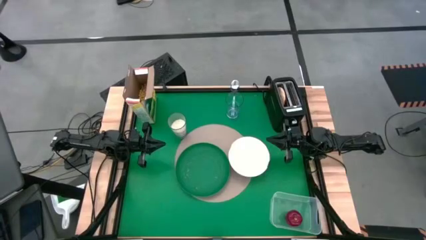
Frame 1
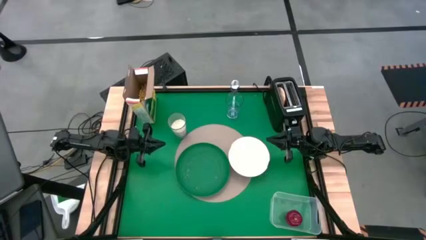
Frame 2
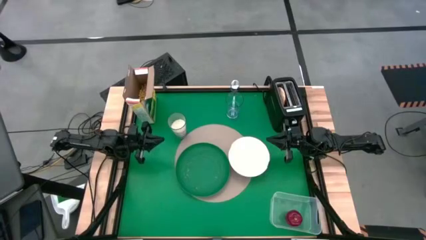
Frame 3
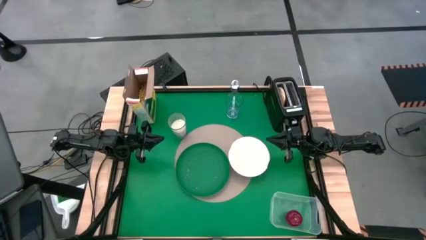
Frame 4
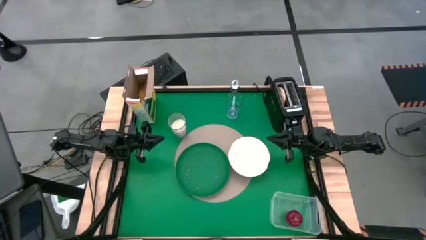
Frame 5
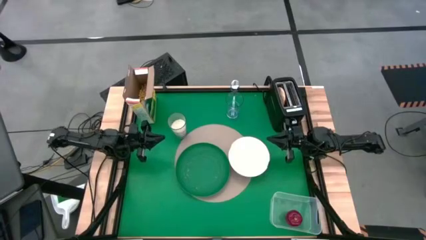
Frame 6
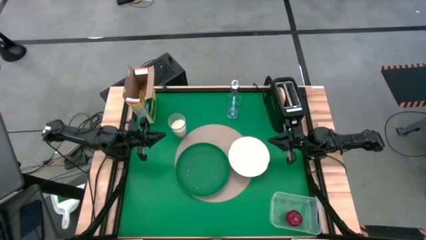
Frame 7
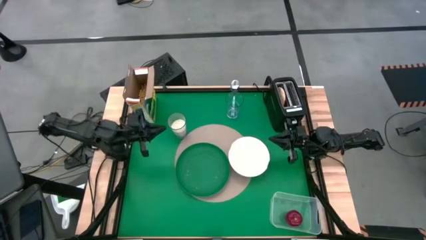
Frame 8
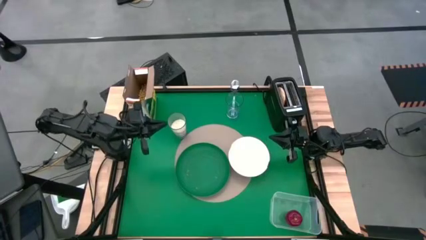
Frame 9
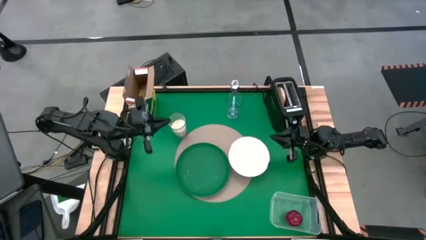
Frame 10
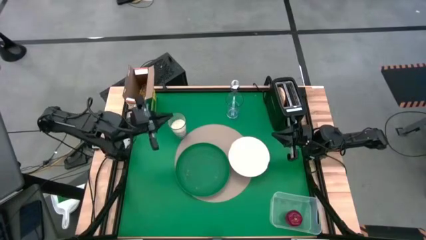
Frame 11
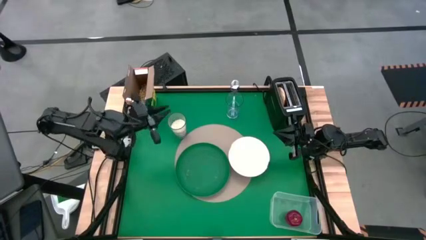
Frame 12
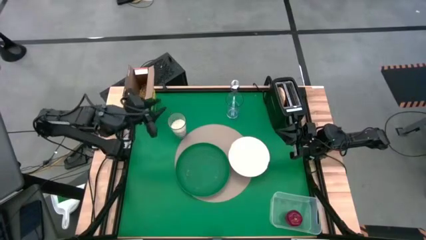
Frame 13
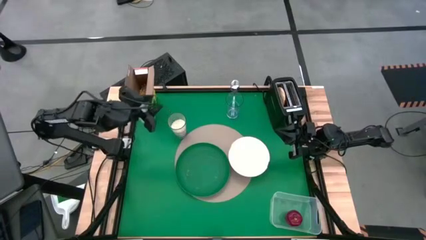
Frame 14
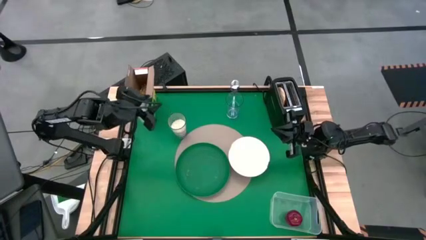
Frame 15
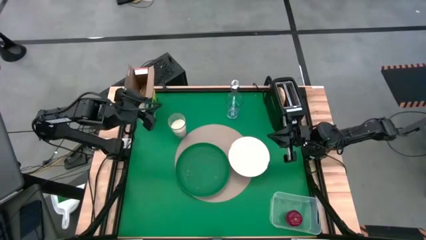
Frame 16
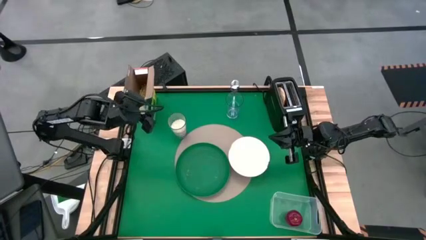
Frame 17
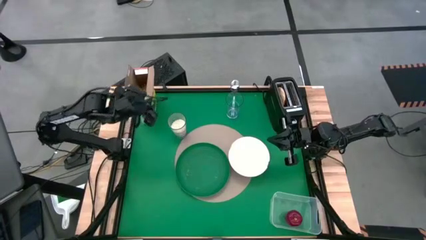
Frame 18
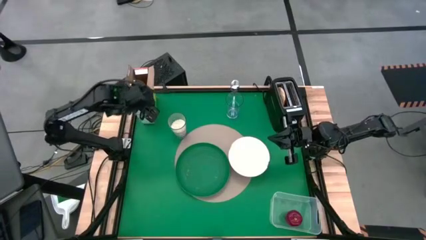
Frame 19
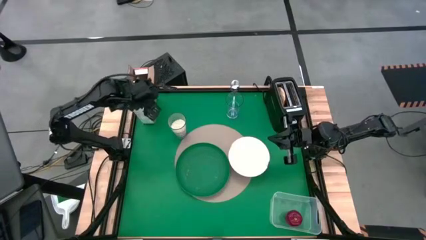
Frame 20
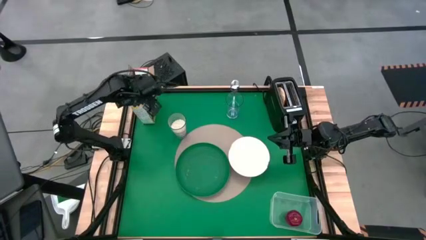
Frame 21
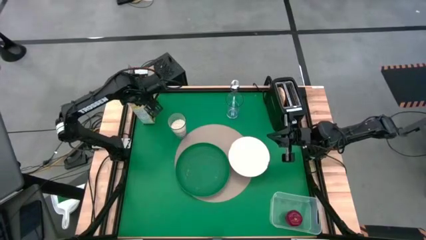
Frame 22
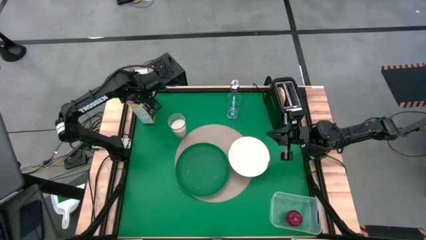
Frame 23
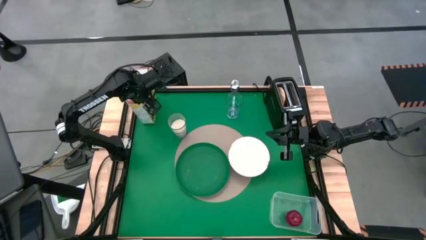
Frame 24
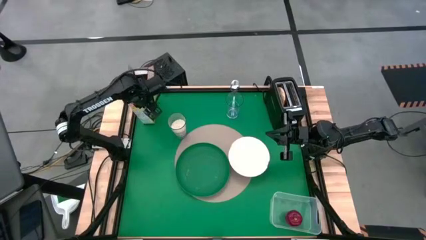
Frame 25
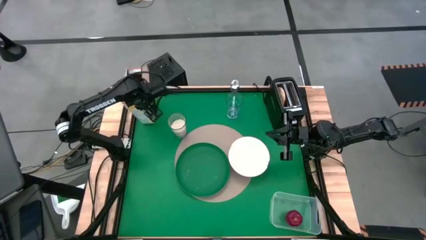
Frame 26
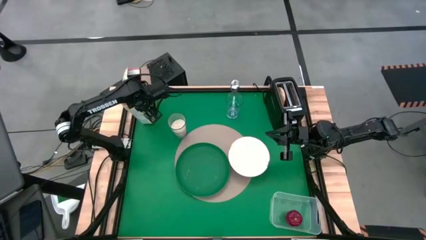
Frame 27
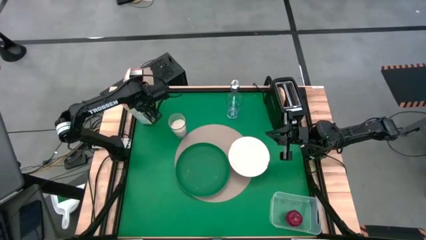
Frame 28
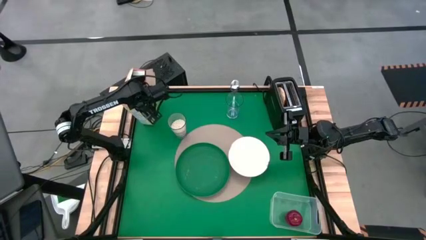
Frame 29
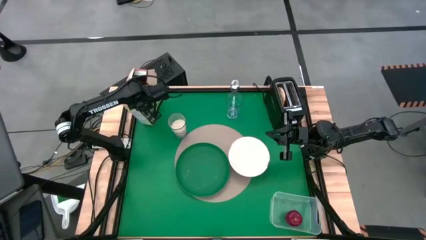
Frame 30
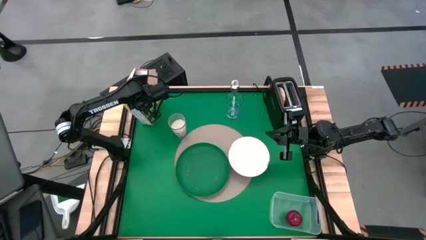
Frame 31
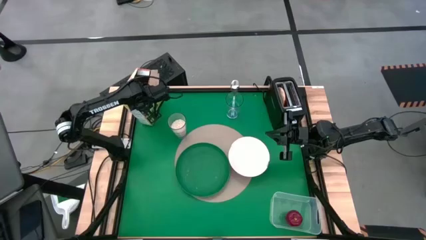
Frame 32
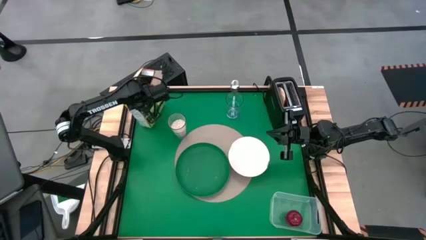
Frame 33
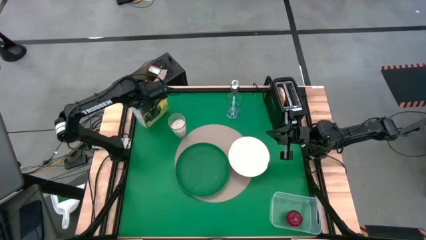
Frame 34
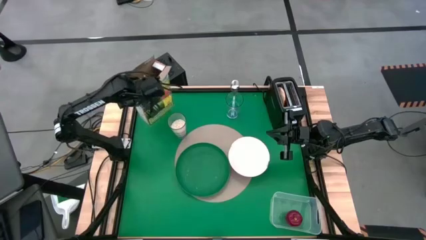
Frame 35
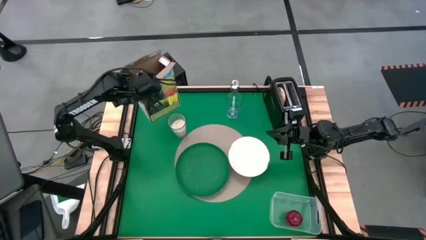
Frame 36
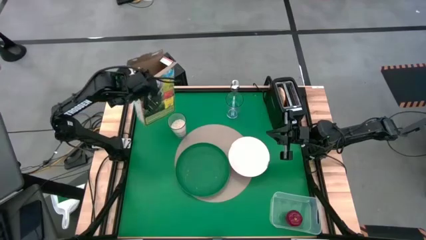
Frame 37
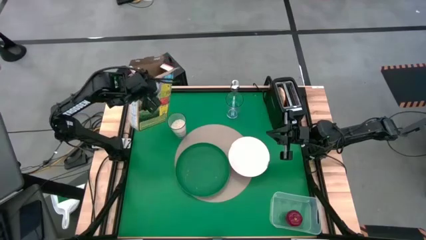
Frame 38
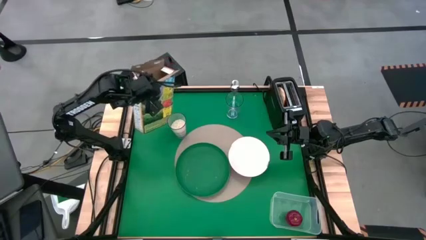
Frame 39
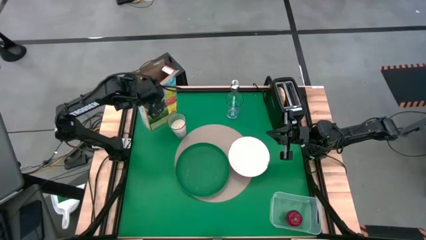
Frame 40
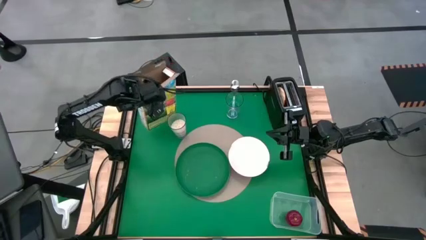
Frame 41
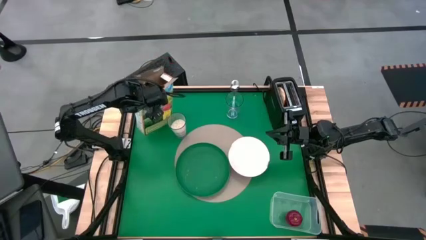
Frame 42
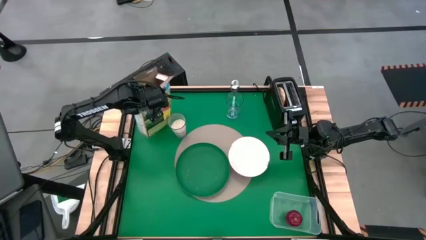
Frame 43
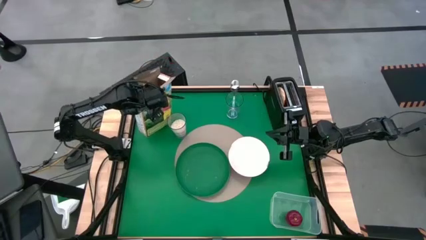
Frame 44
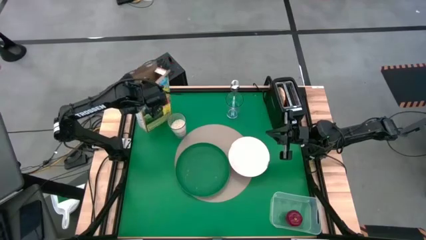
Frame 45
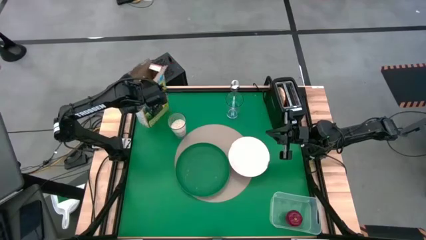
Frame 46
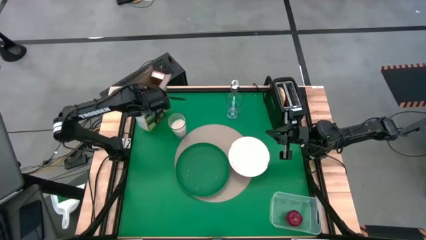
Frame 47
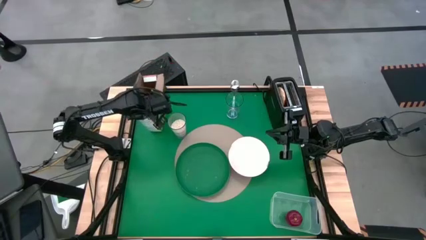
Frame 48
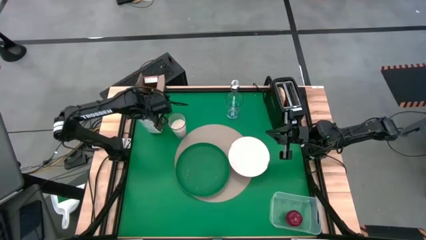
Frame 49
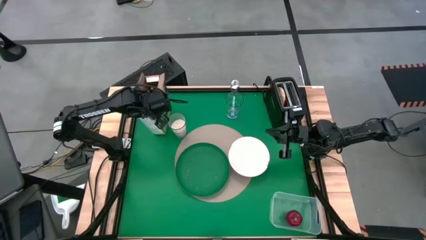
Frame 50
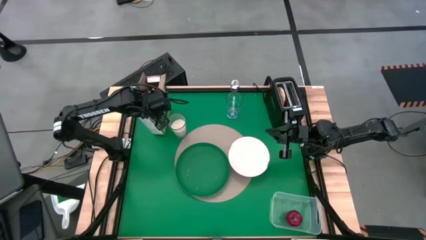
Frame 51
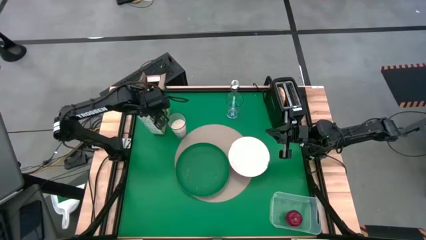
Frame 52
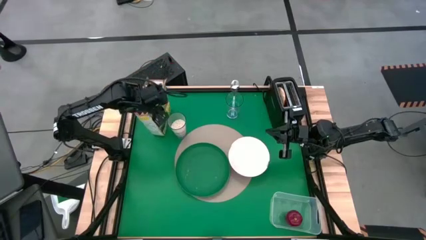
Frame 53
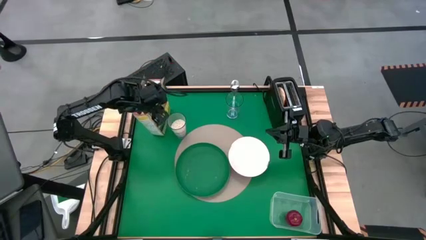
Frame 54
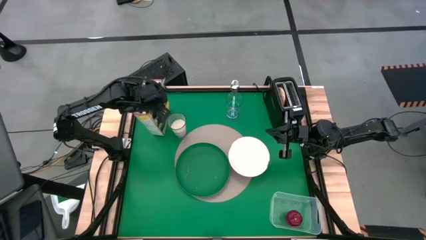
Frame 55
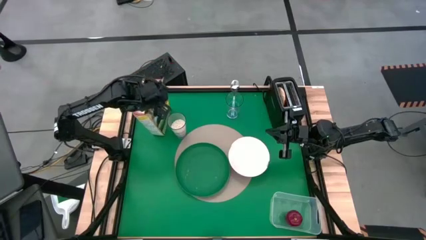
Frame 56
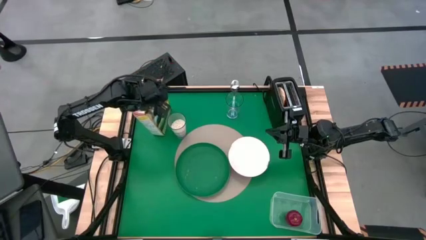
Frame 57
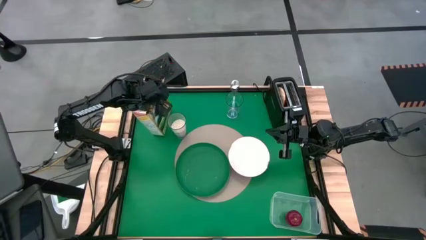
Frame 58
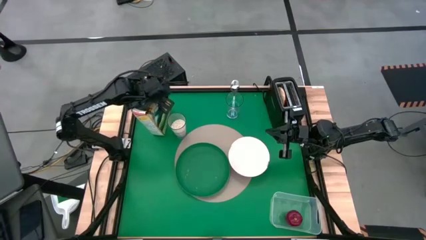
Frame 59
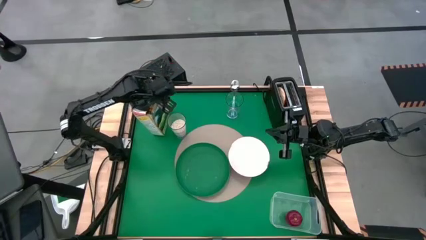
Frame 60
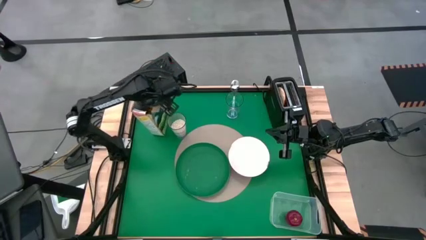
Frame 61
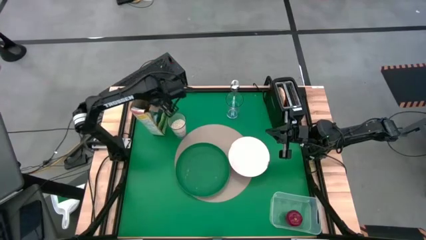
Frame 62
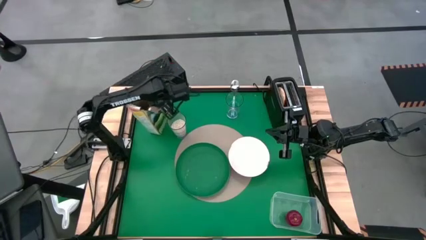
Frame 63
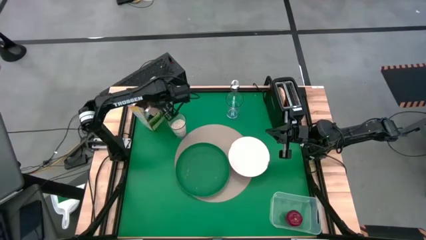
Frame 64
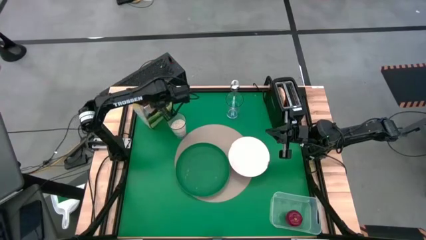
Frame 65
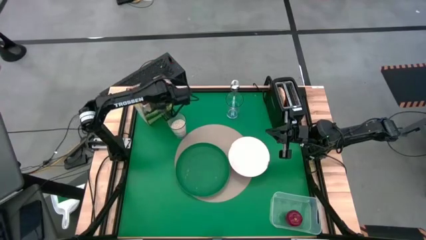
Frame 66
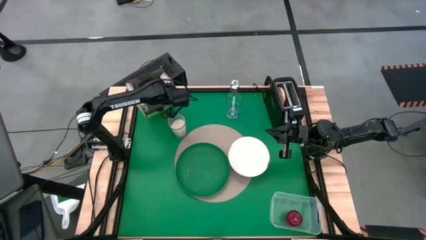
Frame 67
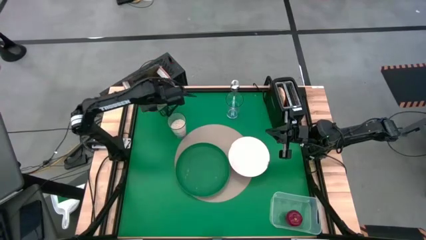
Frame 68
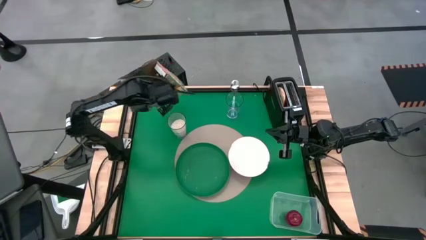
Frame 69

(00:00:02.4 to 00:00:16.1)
Task: Arrange a breakfast setting
Pour the cereal into the white bowl
